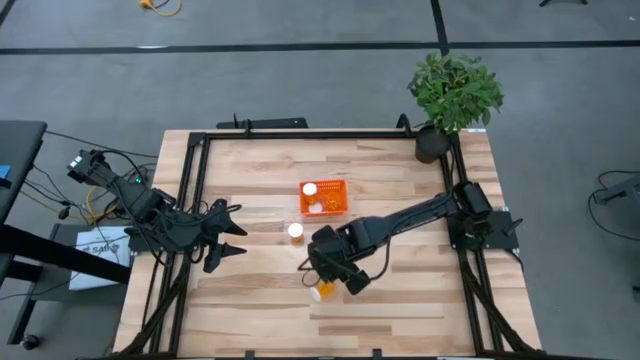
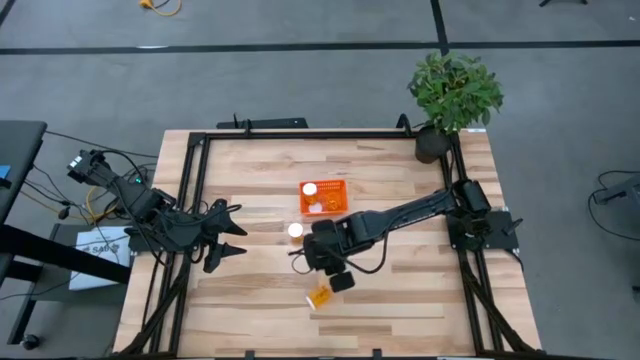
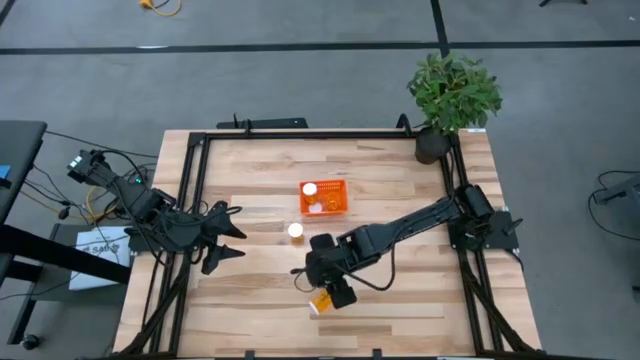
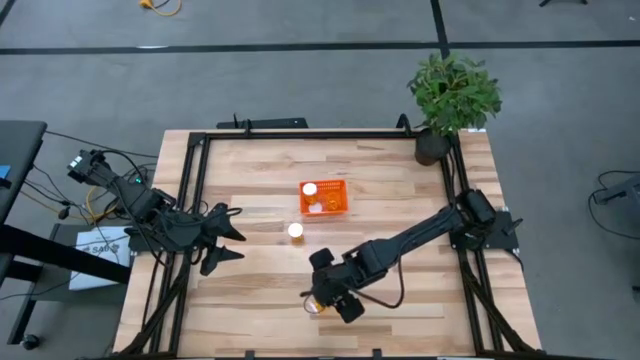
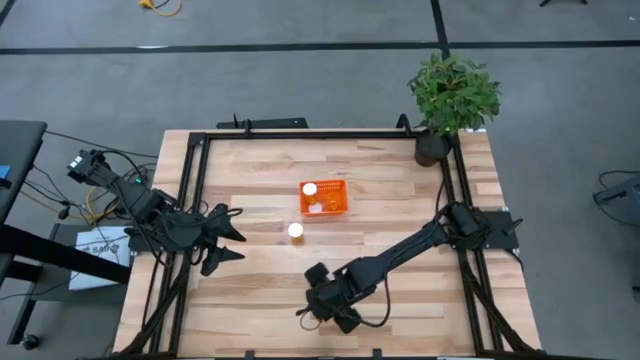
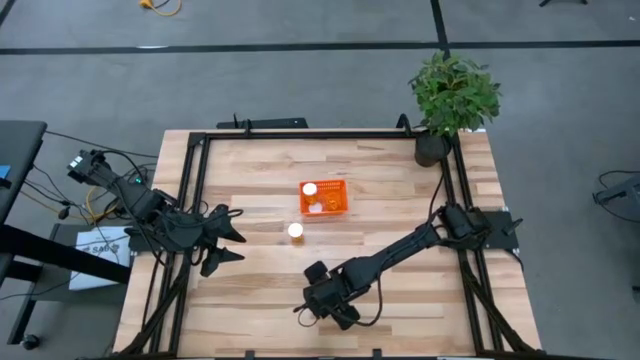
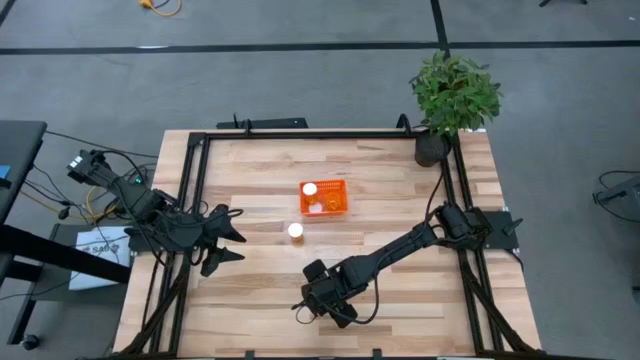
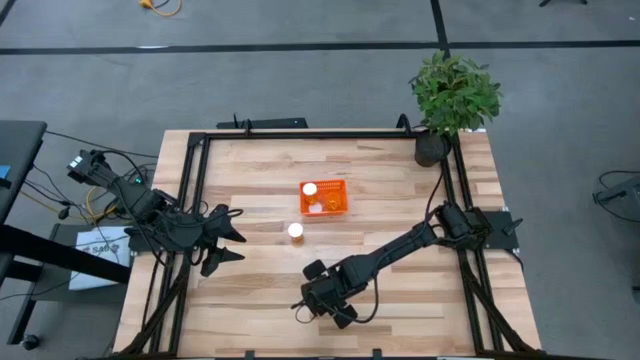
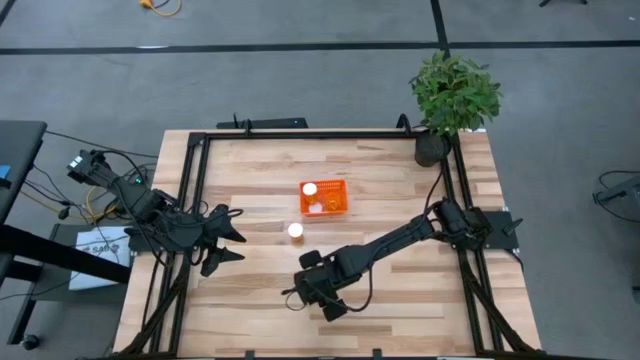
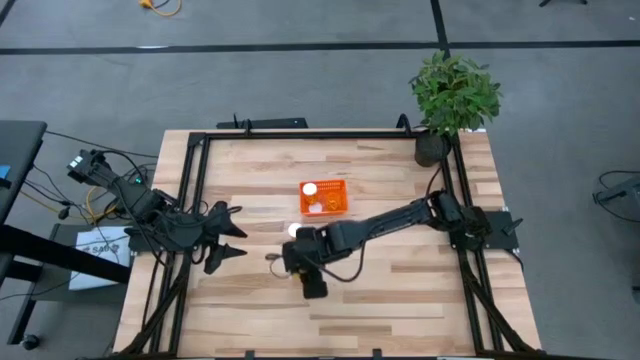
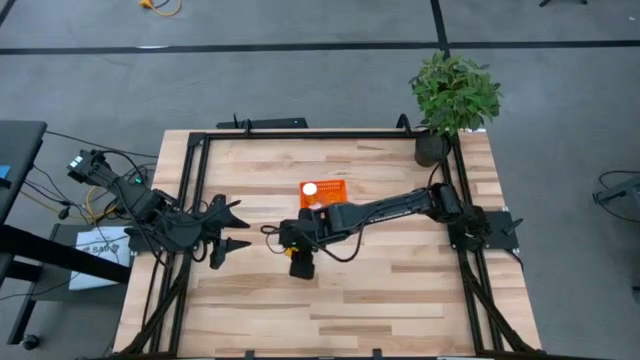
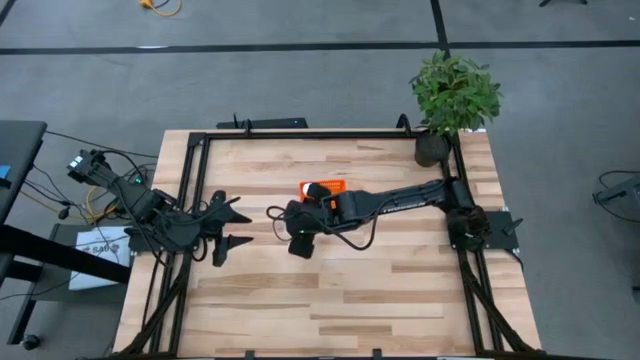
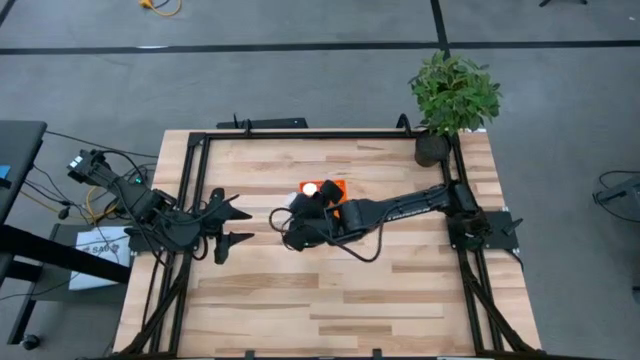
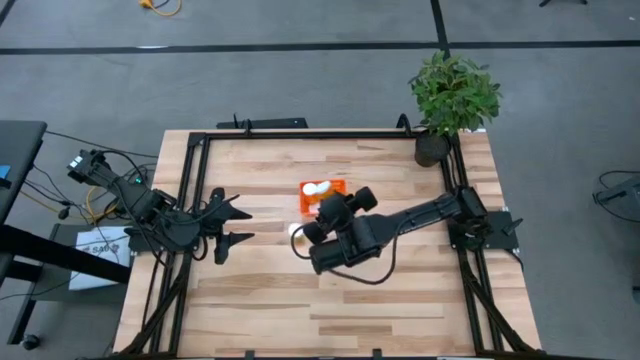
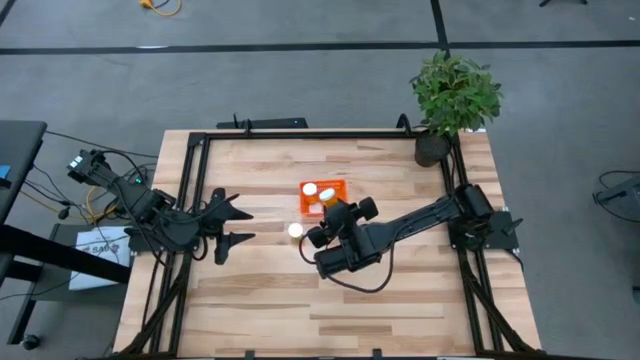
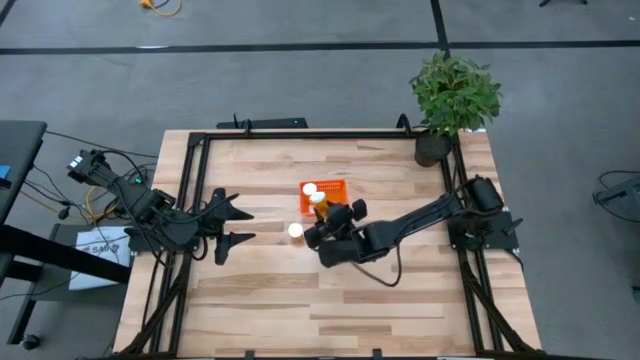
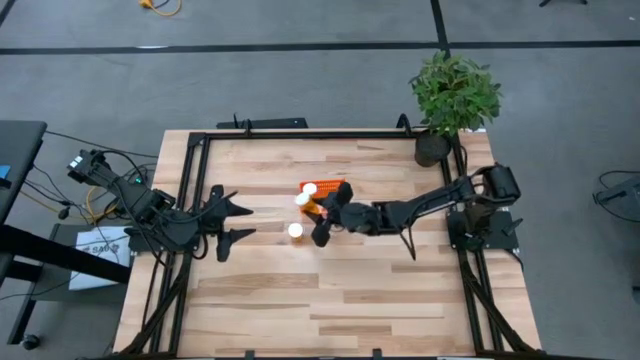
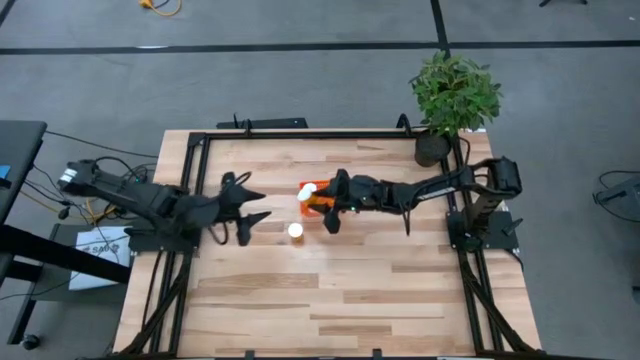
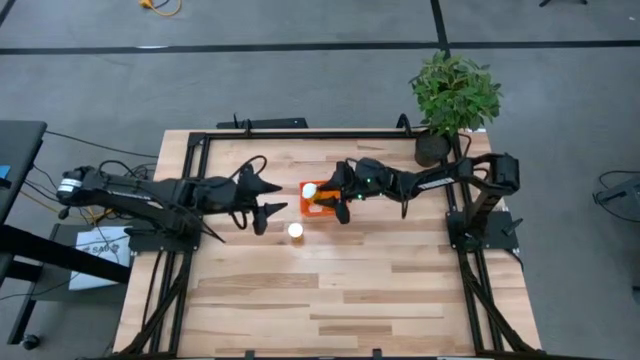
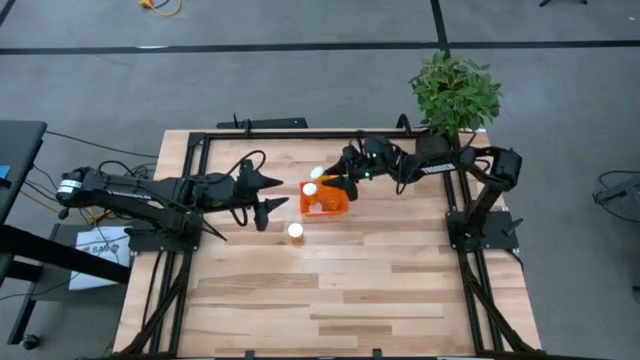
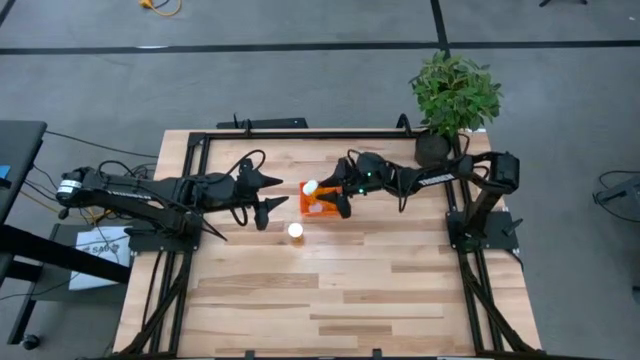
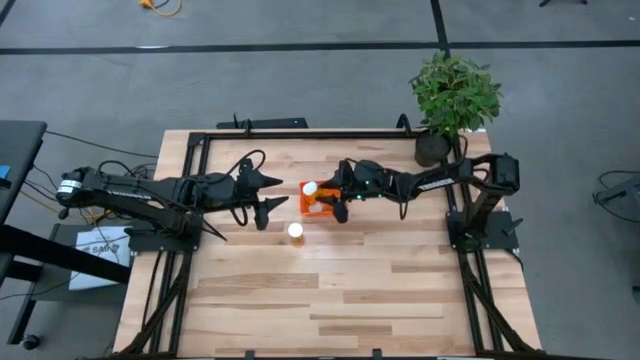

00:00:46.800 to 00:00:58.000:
Task: Pick and place pill bottles into a basket
Put the orange pill bottle into the orange bin

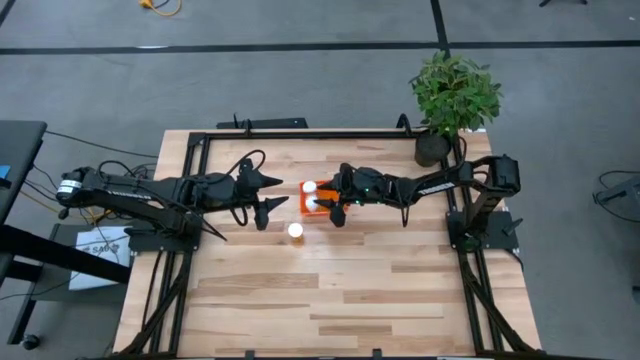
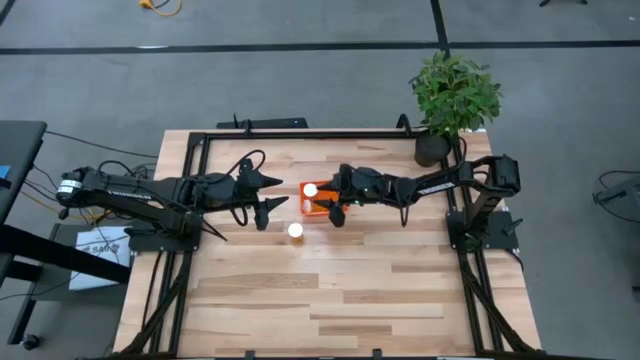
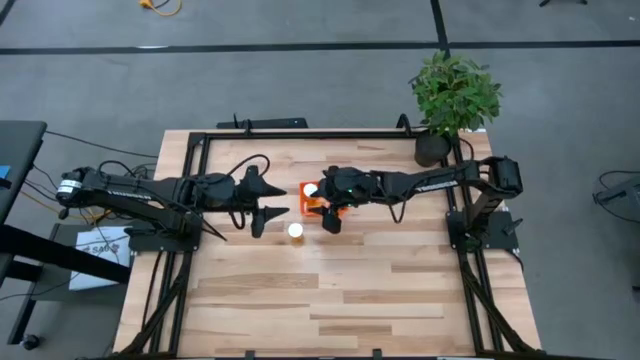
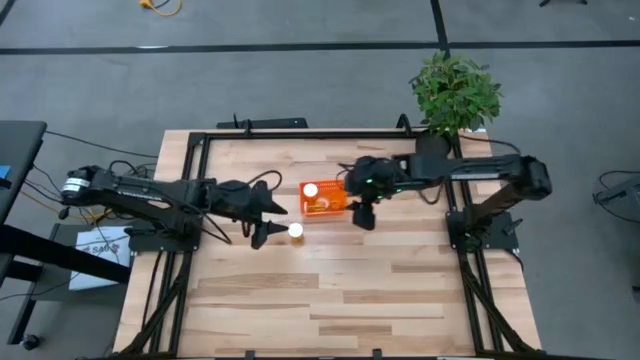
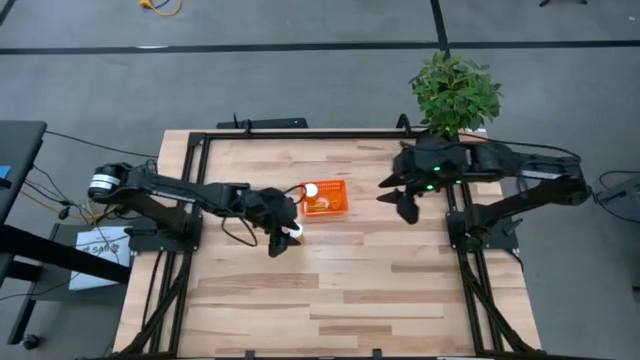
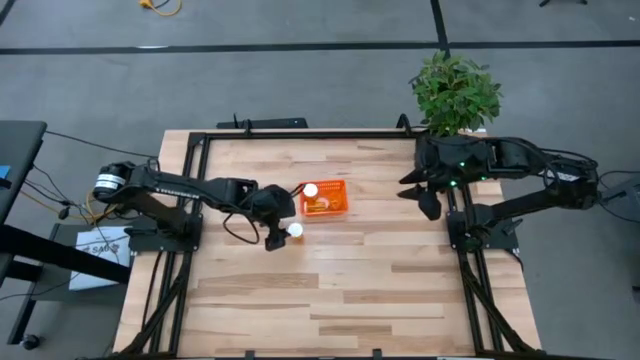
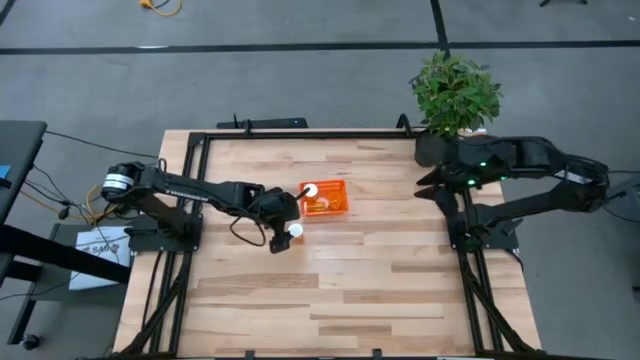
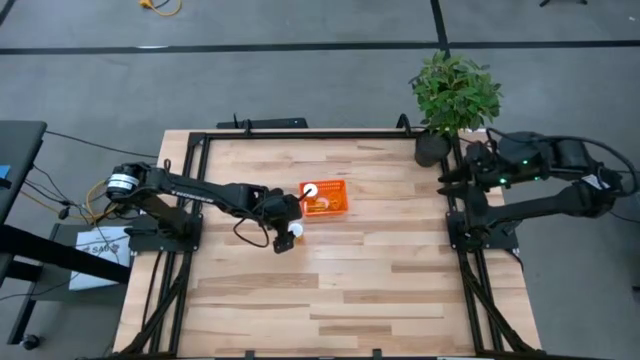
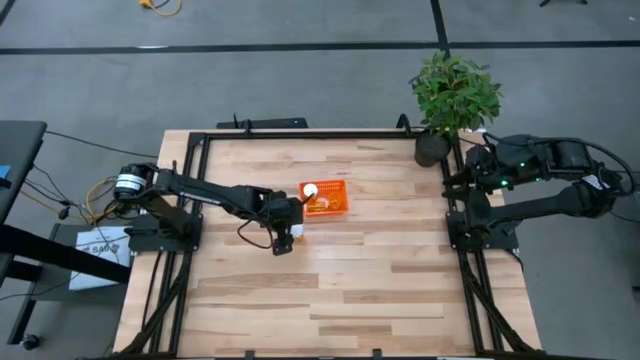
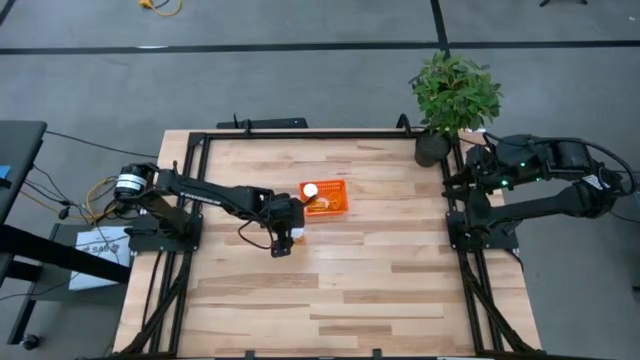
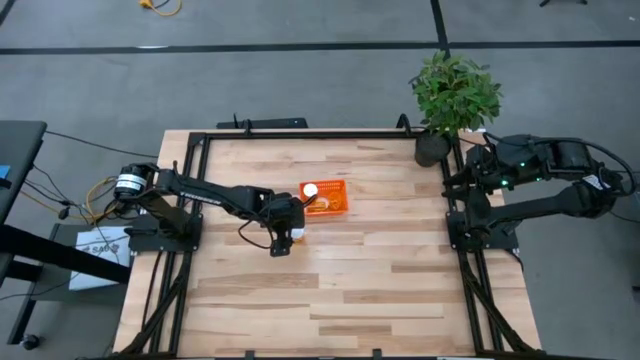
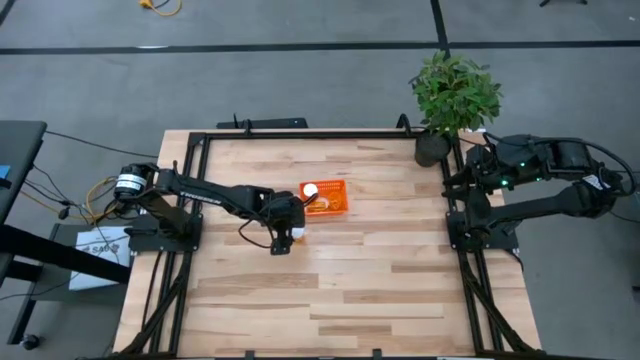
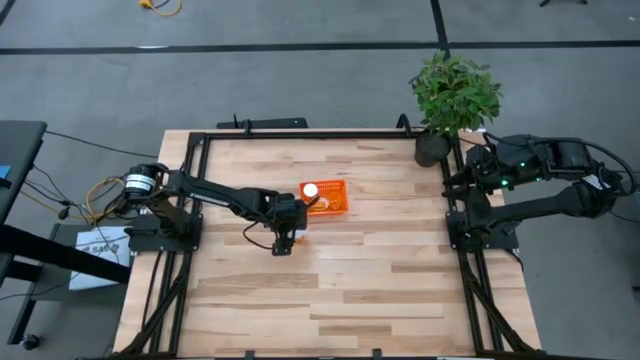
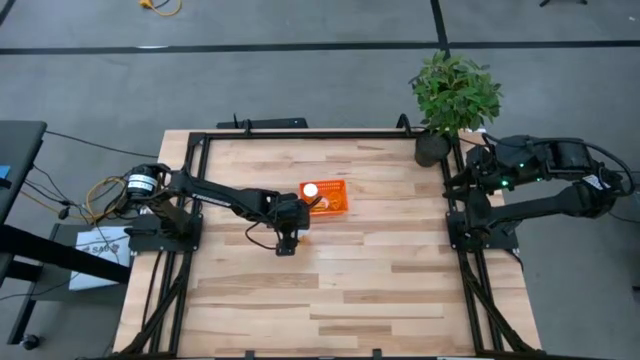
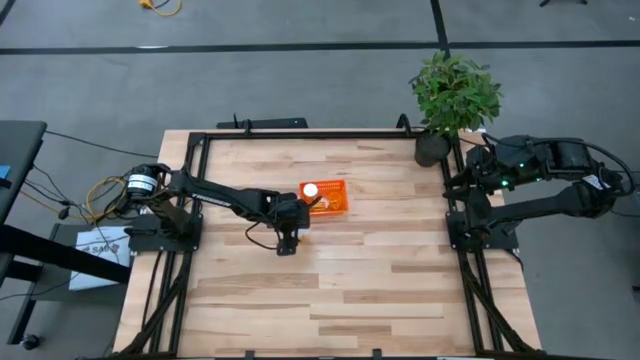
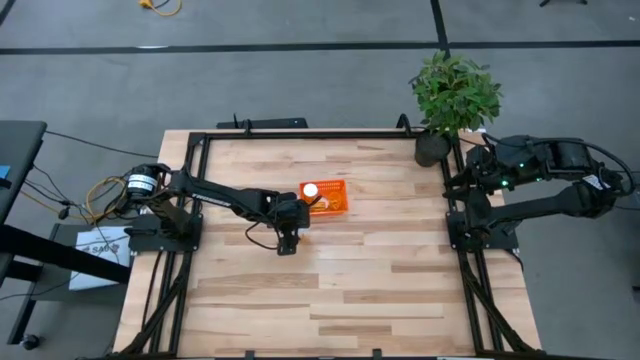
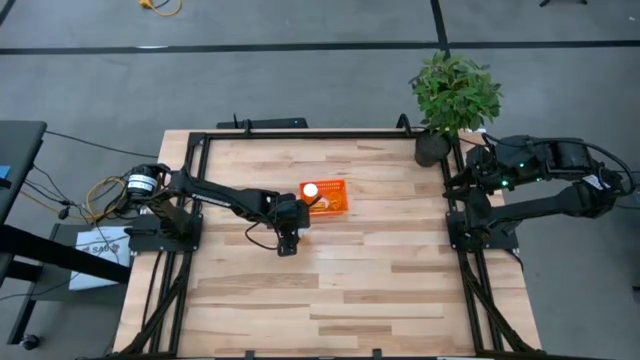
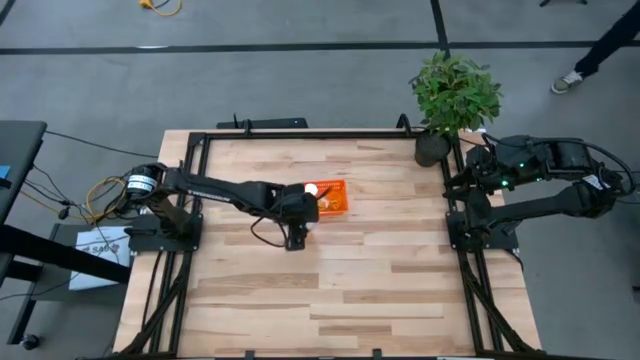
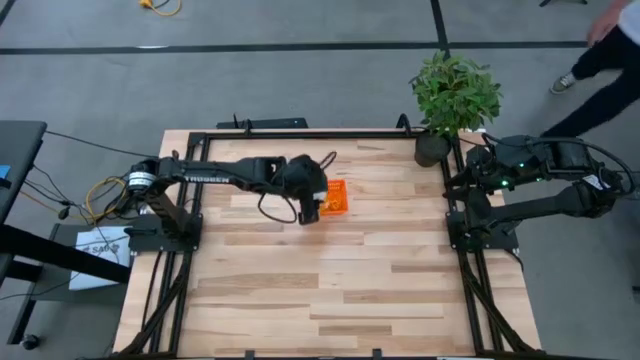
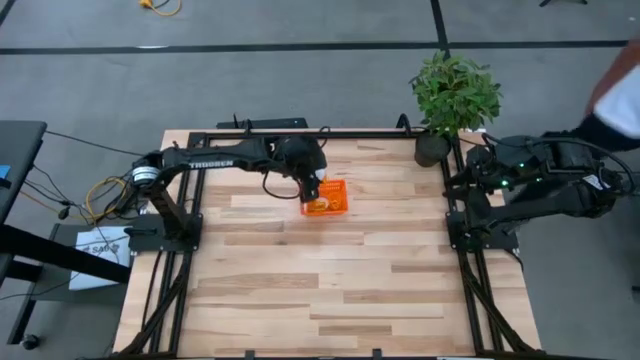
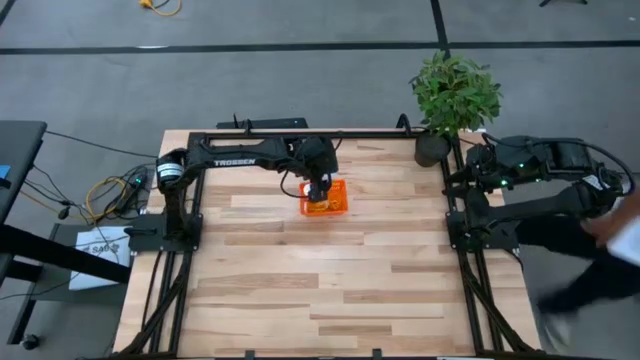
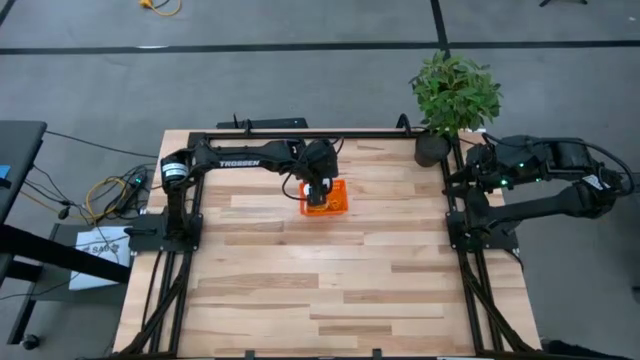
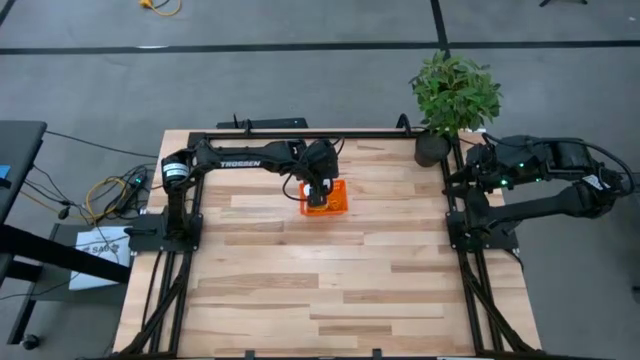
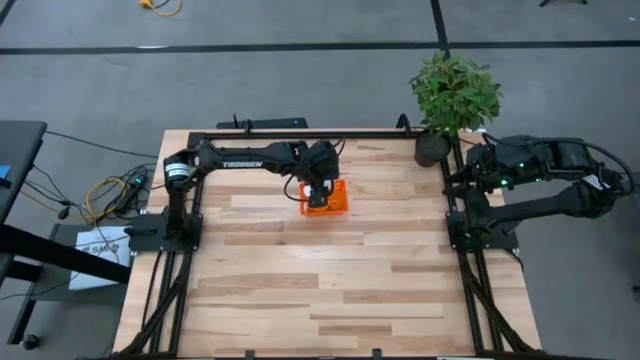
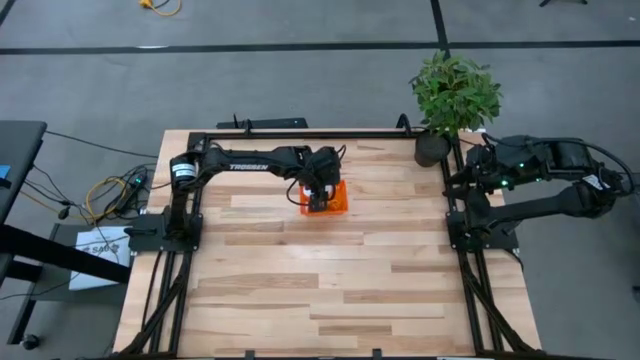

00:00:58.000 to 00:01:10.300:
Put the orange pill bottle into the orange bin
